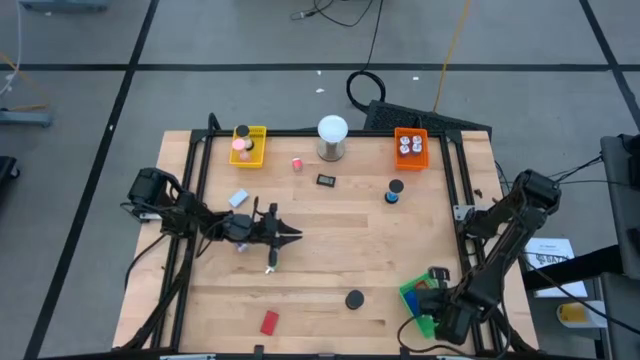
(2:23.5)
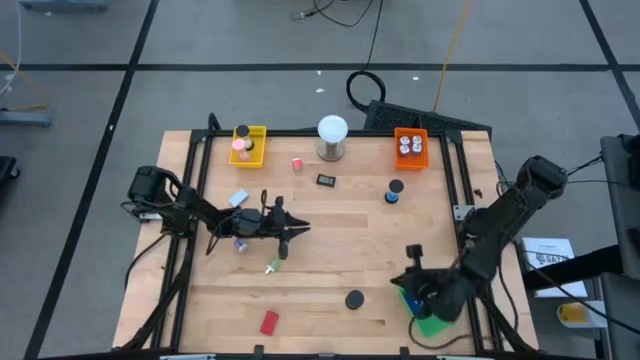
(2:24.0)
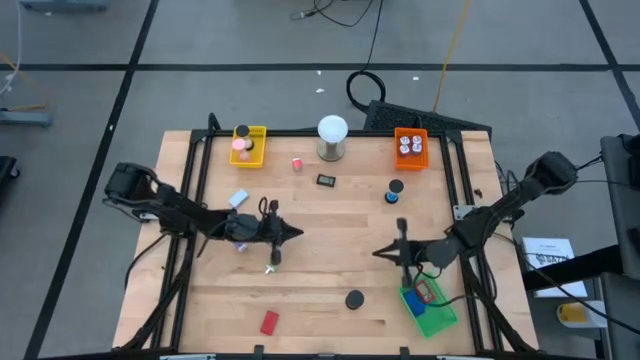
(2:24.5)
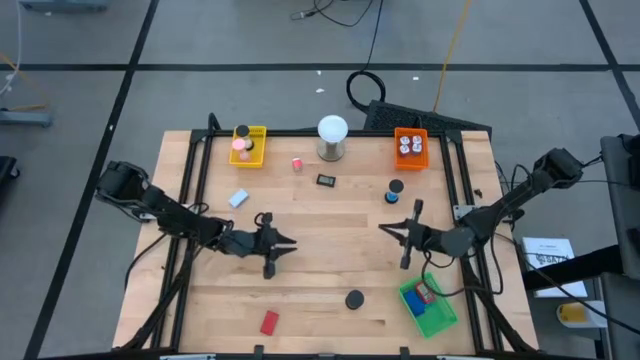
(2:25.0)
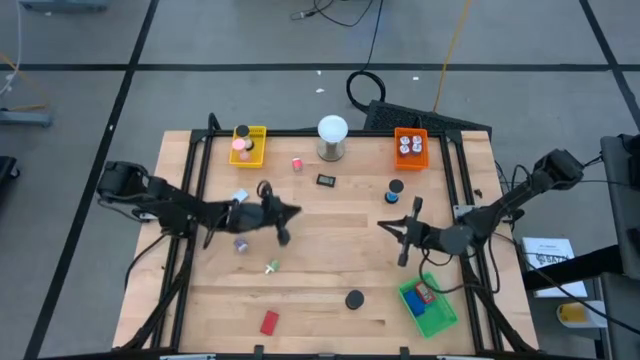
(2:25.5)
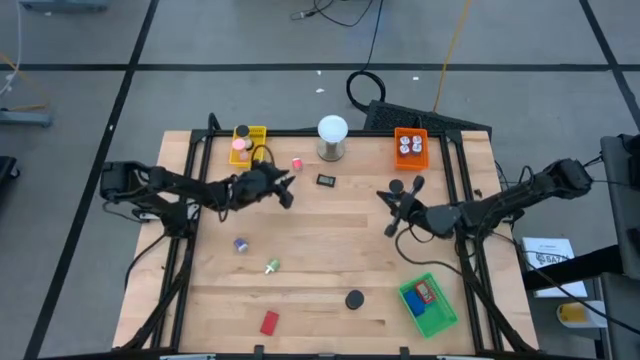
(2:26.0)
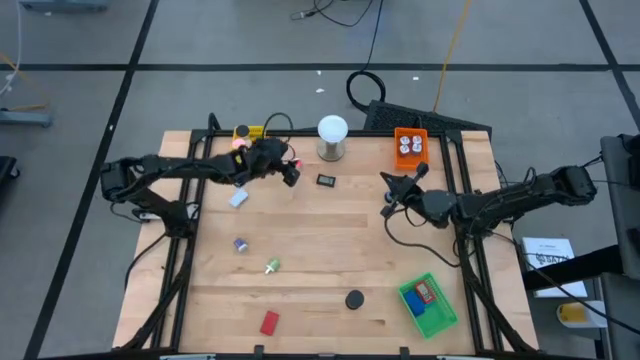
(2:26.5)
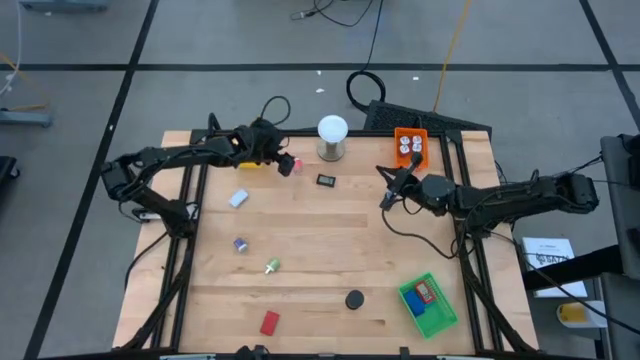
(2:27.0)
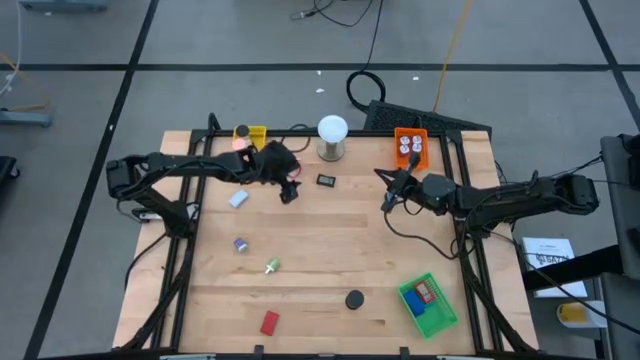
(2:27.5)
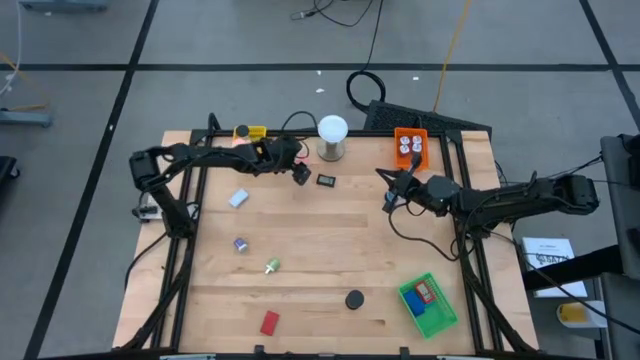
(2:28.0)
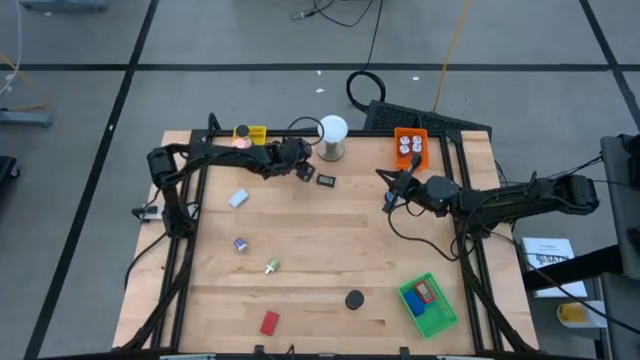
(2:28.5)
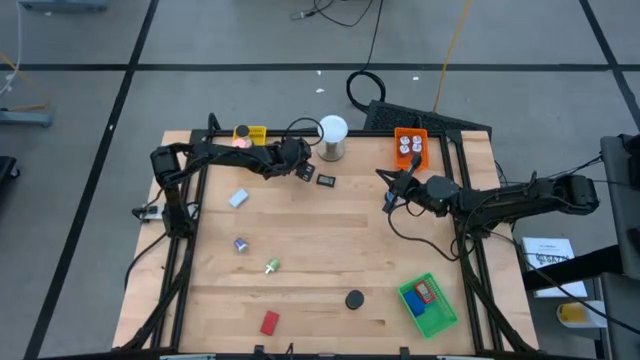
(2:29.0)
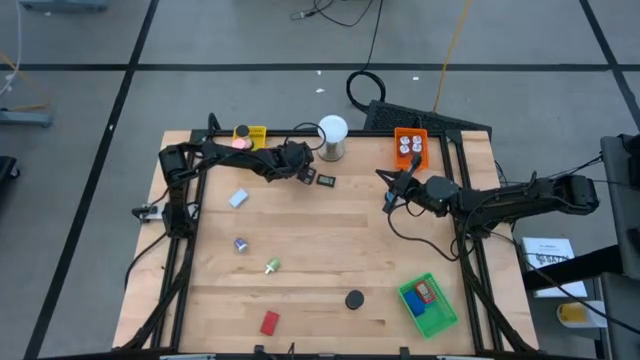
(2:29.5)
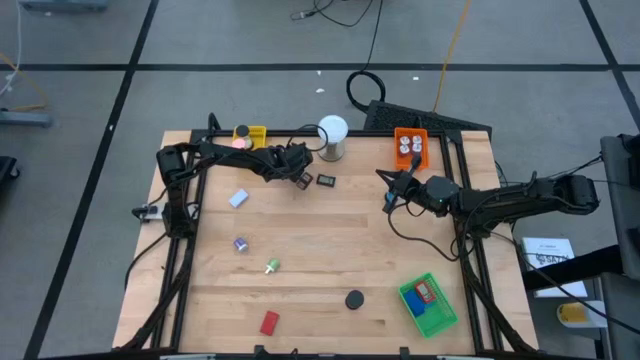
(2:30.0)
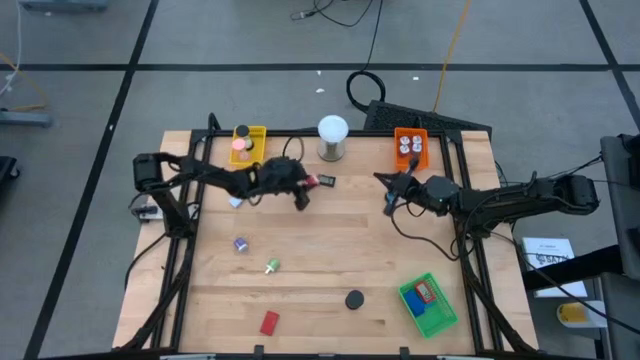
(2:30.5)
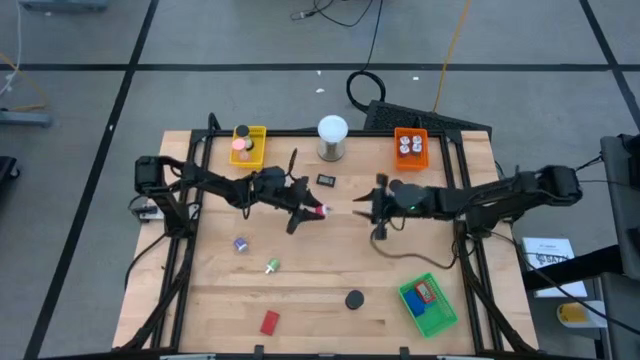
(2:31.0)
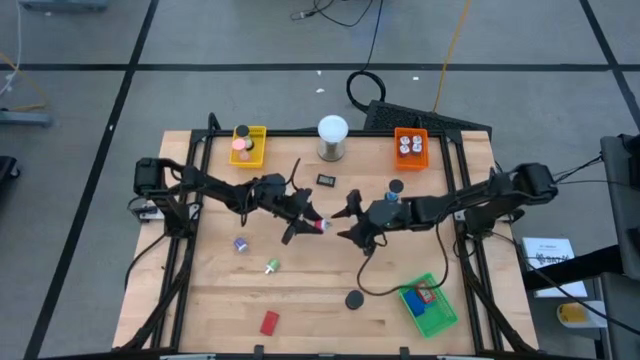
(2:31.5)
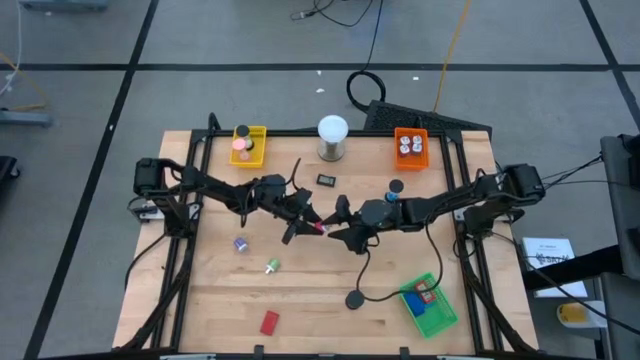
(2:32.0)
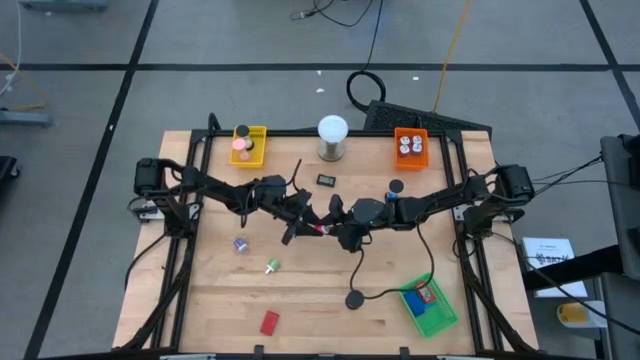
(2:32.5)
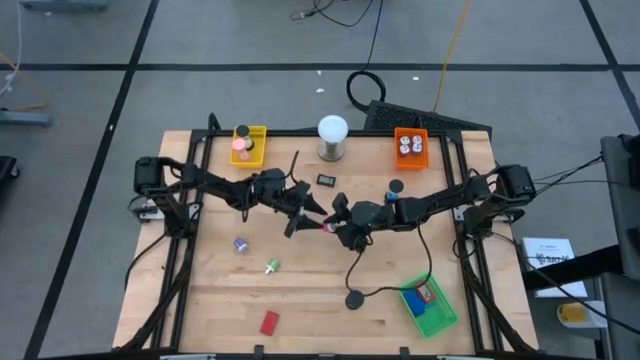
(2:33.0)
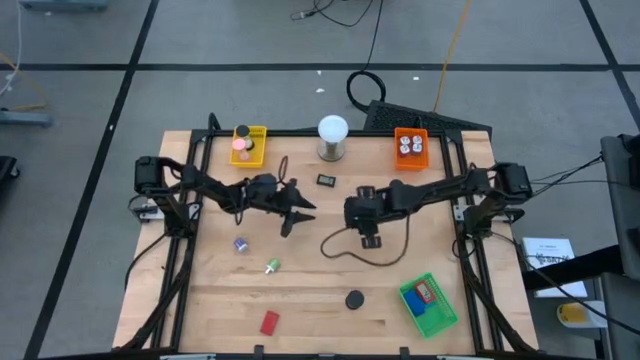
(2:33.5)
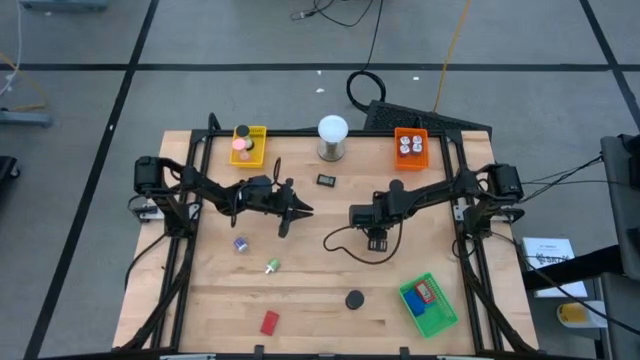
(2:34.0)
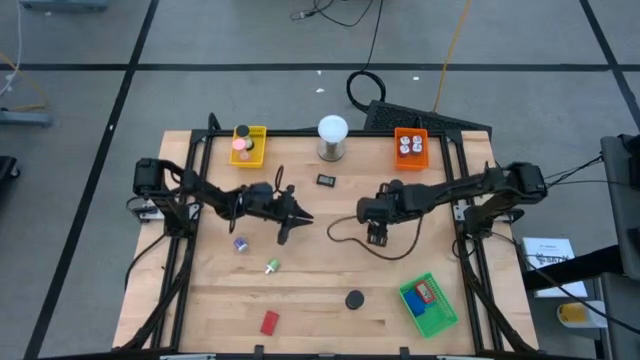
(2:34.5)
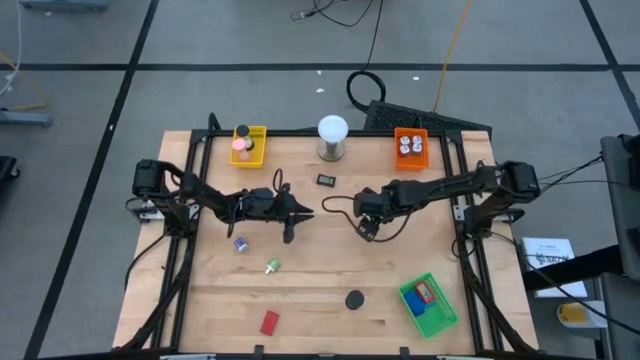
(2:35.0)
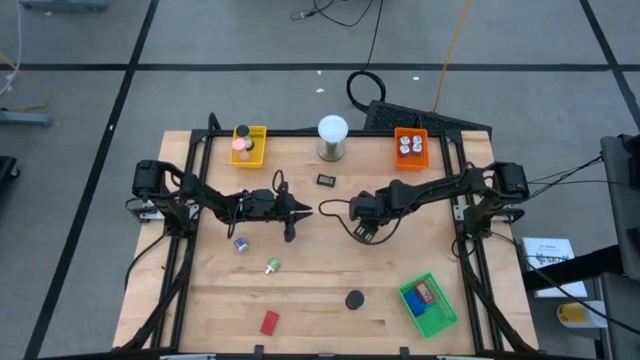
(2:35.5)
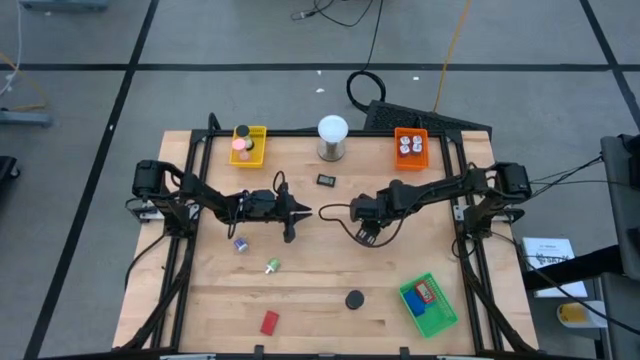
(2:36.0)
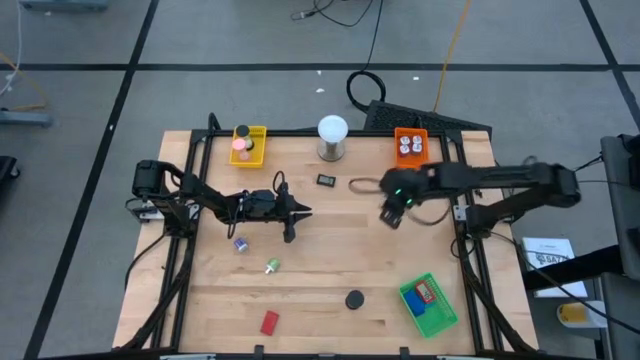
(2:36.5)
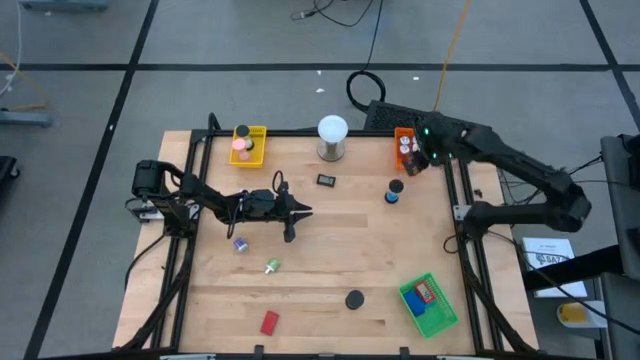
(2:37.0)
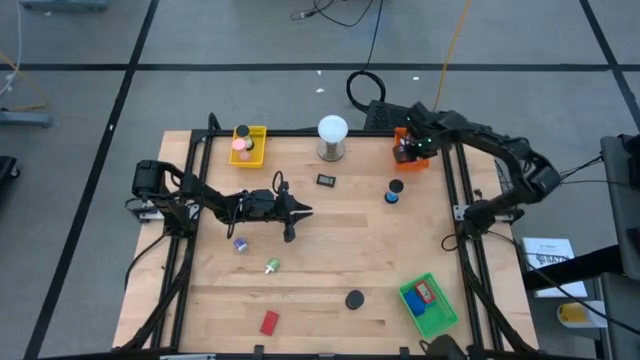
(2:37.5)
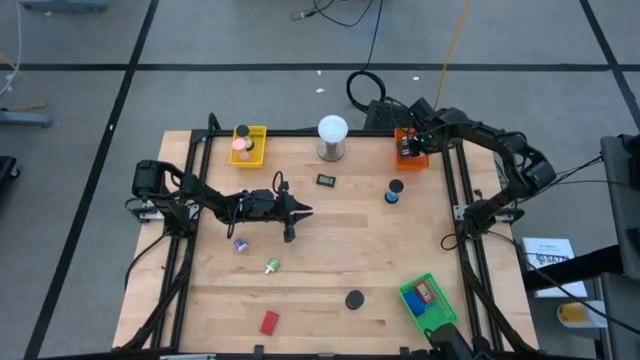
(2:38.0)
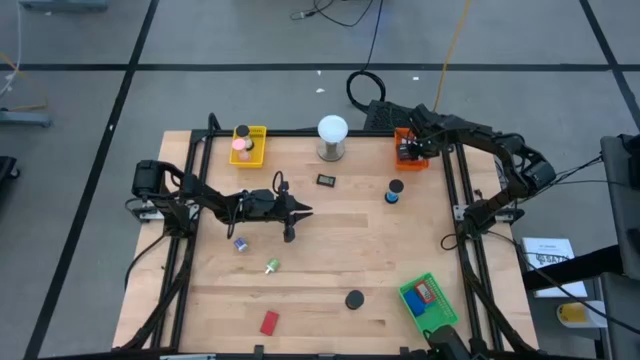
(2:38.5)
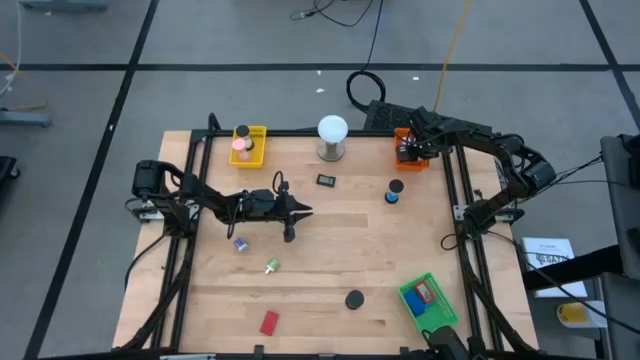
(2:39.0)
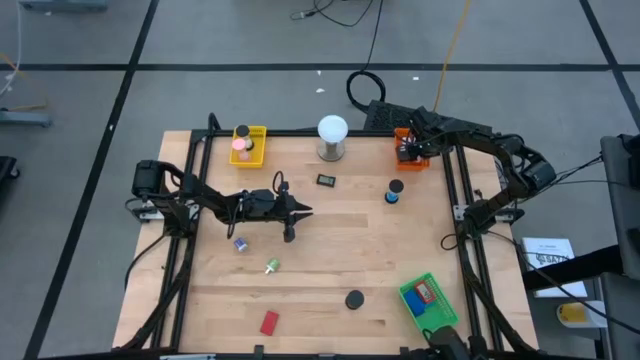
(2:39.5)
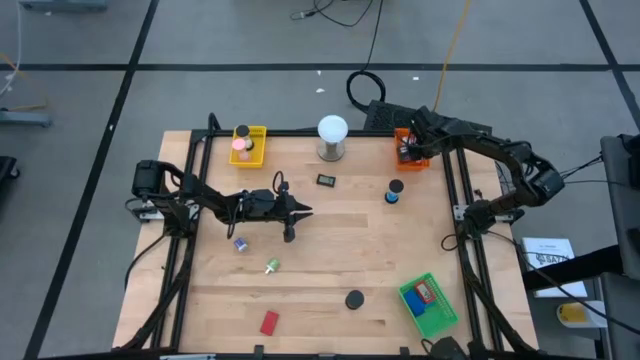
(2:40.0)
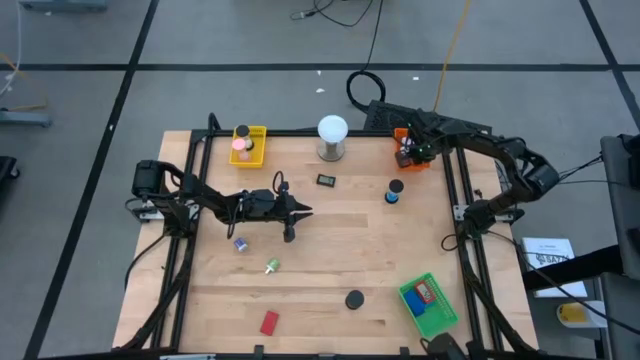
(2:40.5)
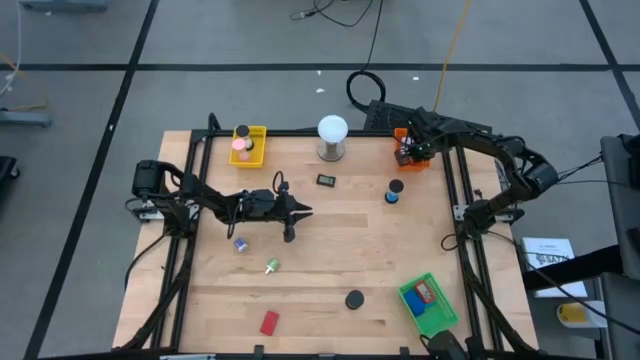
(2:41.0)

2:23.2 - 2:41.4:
Task: Pick & Place Office items
Put the pink charger adaptor into the orange bin
